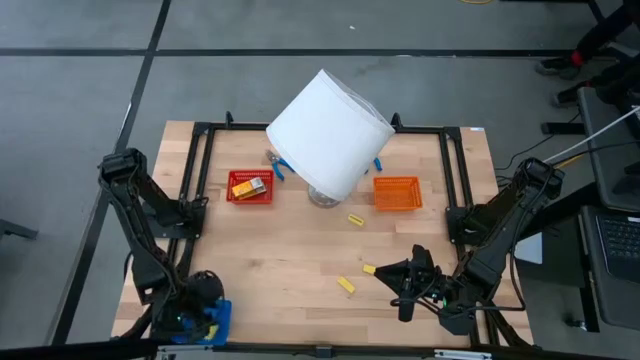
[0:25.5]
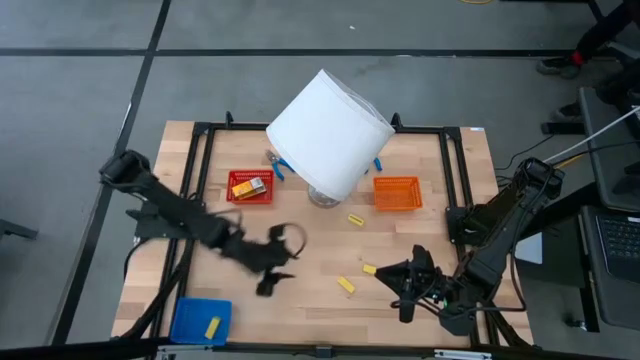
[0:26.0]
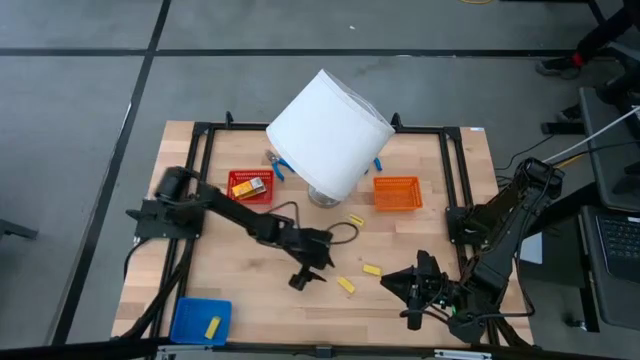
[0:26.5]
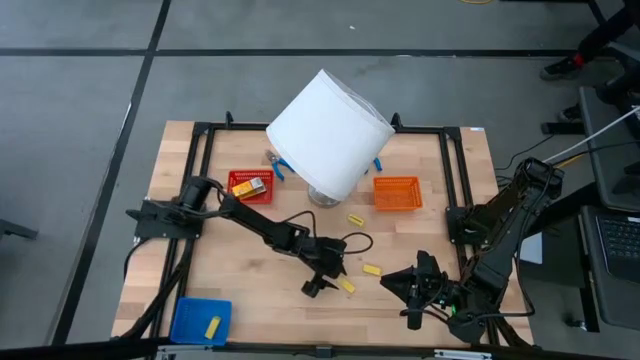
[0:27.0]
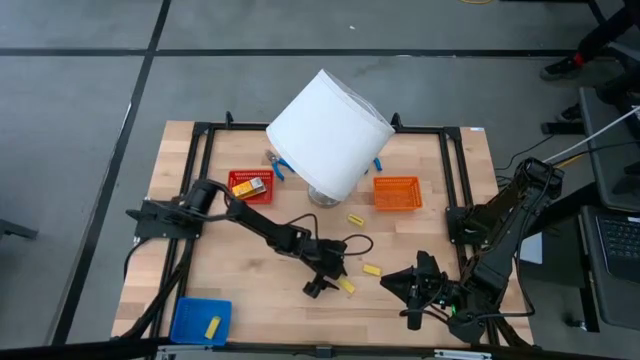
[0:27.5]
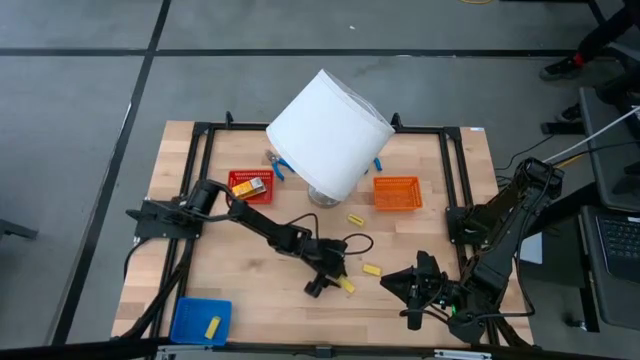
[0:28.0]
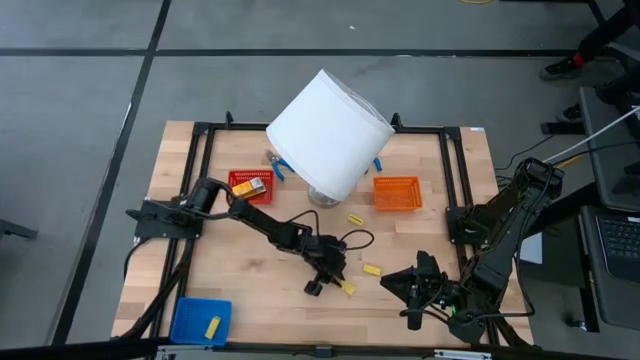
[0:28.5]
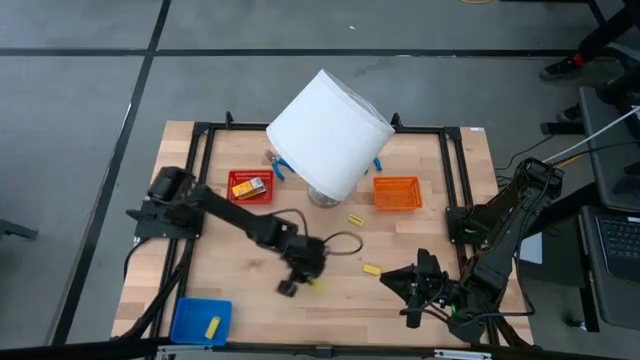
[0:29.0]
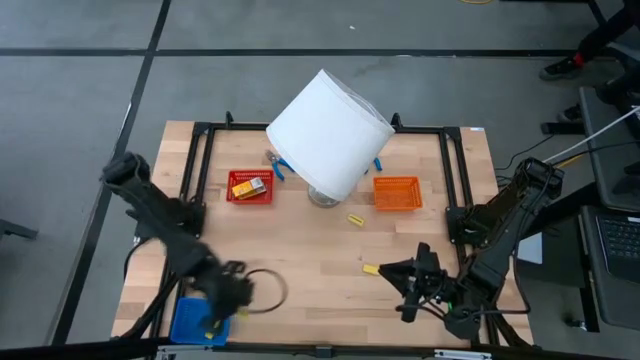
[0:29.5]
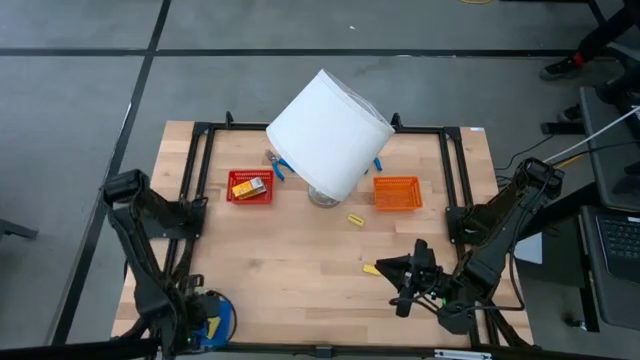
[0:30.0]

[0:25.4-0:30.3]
Task: Pick & Place School Supplies
Put the yellow eraser into the blue bin

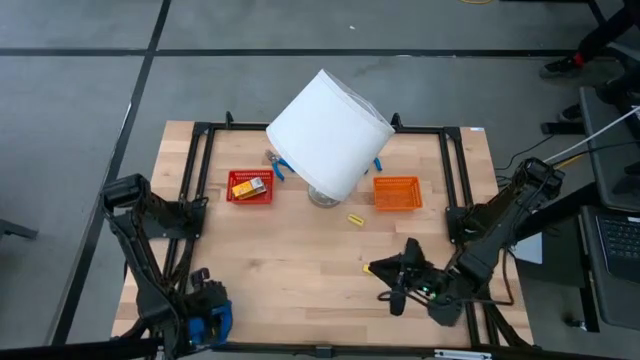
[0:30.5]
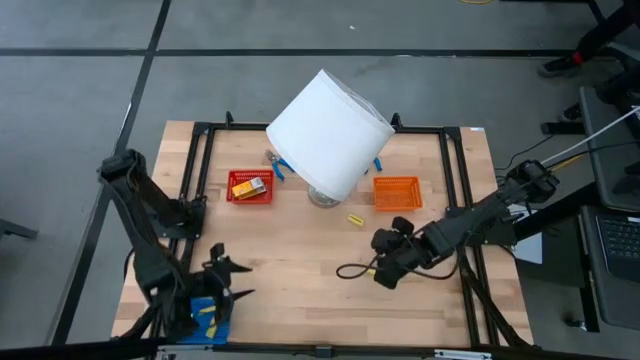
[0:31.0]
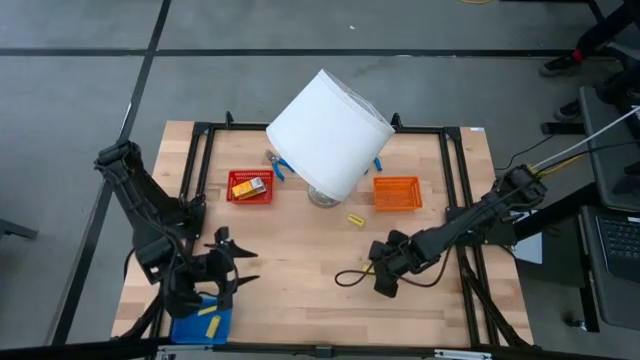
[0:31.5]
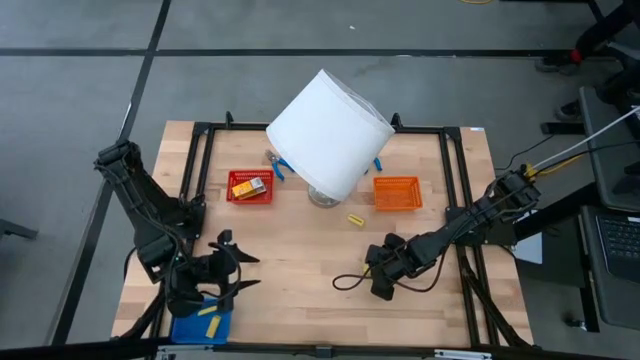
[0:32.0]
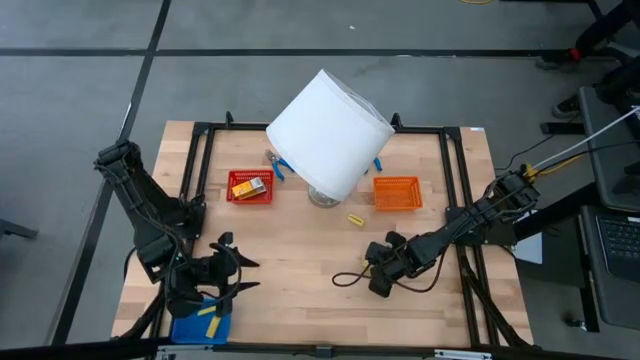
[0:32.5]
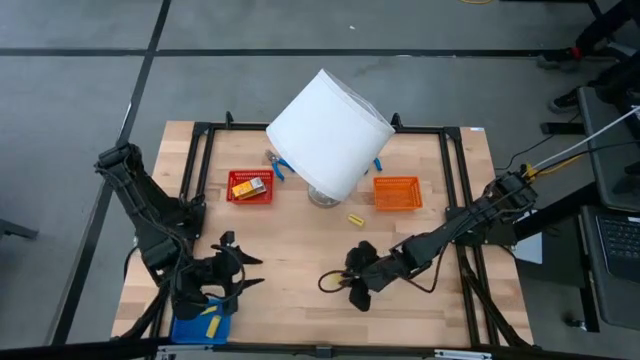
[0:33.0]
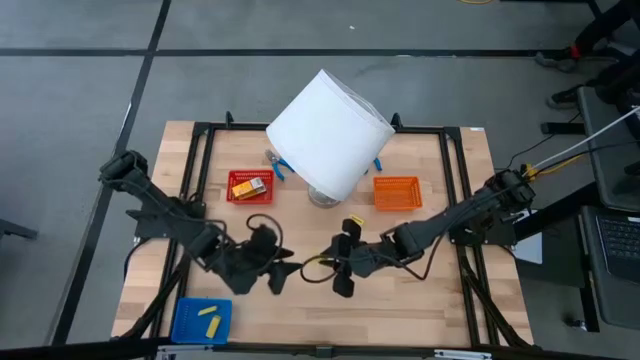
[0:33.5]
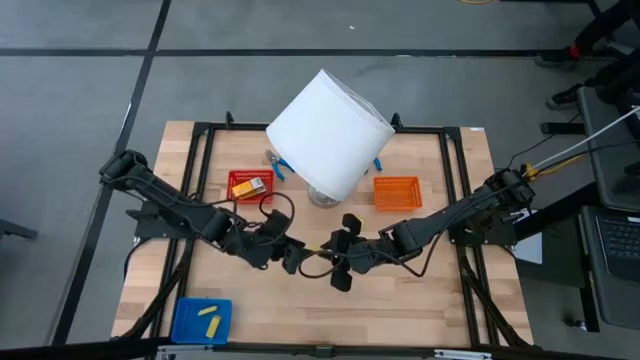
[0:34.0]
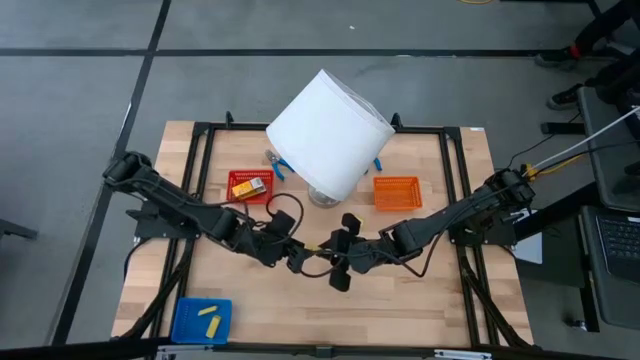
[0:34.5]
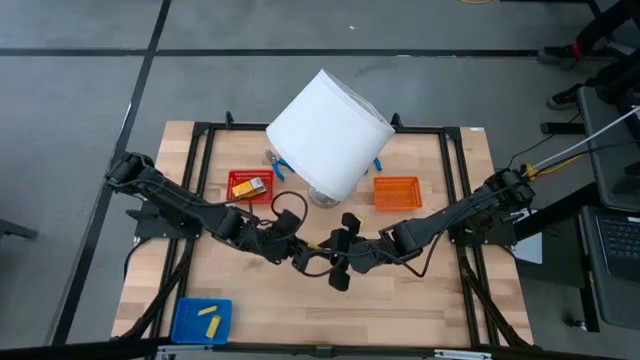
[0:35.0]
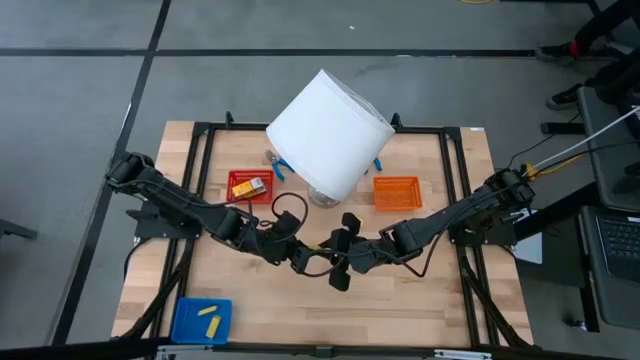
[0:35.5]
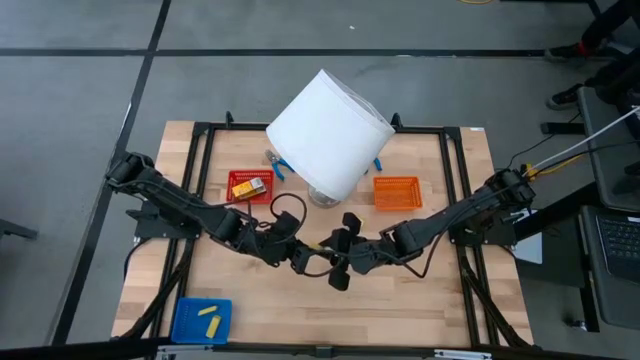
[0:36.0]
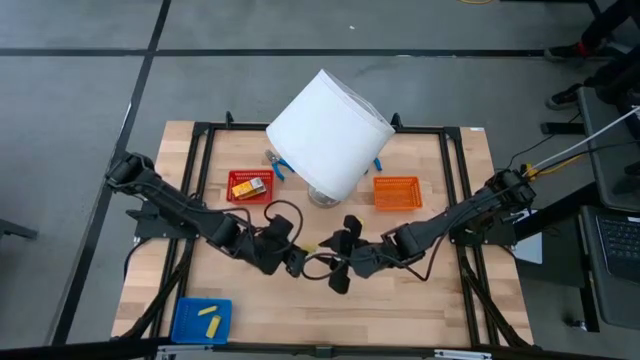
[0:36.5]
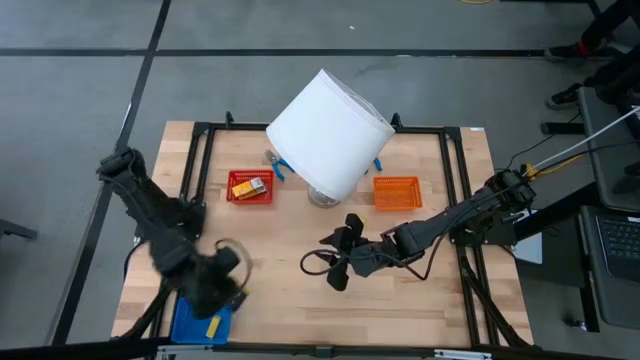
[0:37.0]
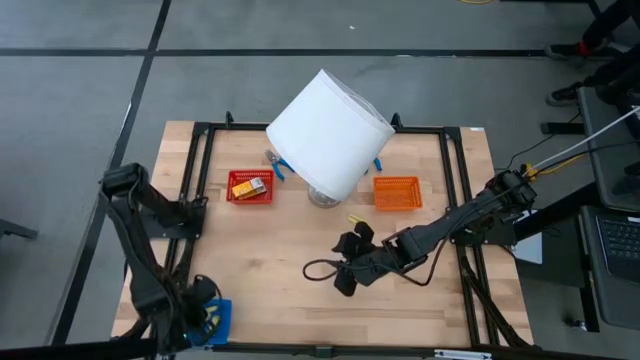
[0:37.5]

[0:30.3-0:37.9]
Put the yellow eraser into the blue bin

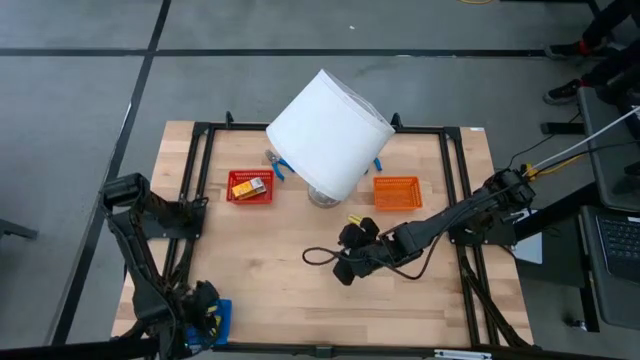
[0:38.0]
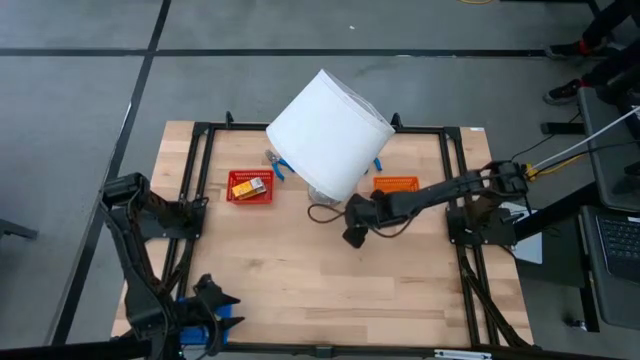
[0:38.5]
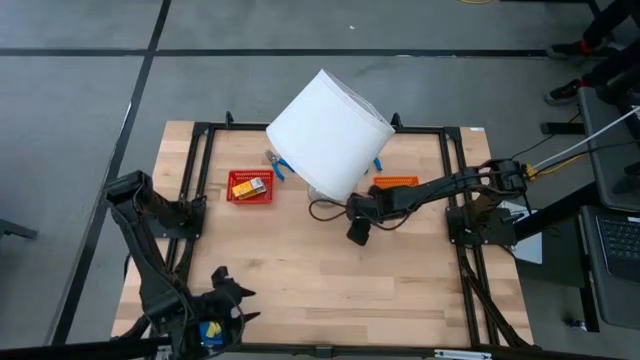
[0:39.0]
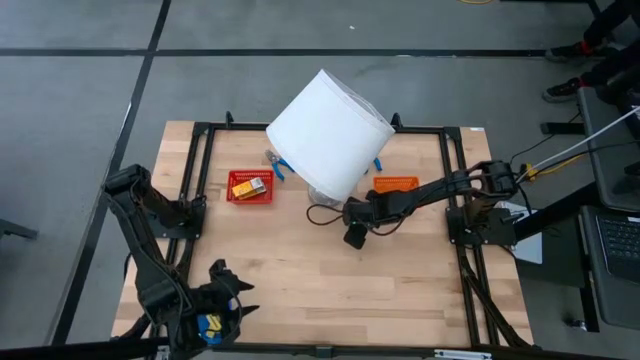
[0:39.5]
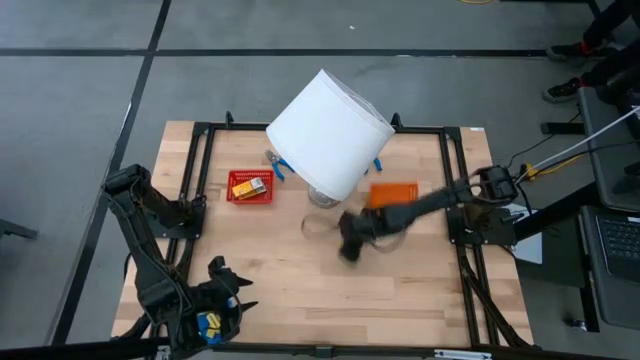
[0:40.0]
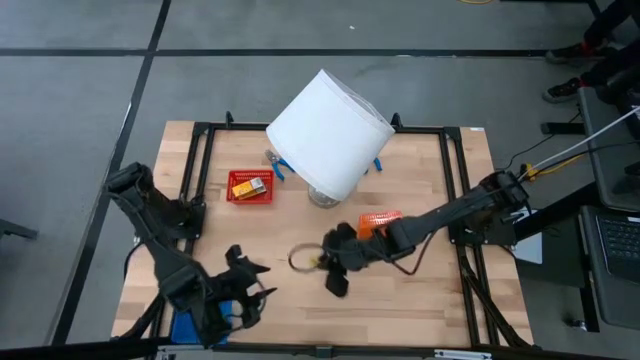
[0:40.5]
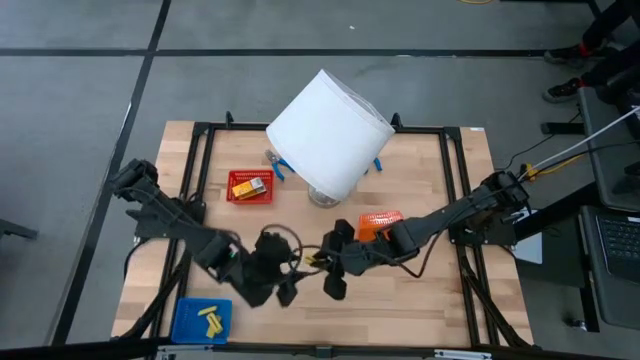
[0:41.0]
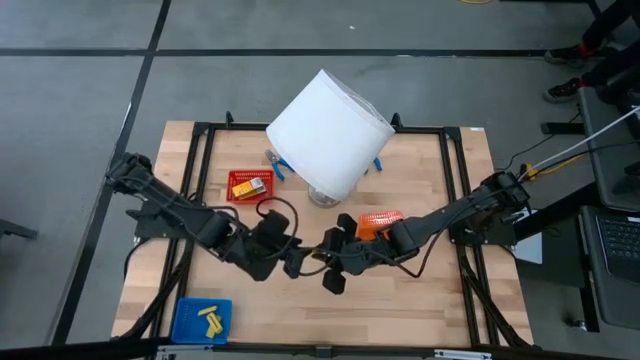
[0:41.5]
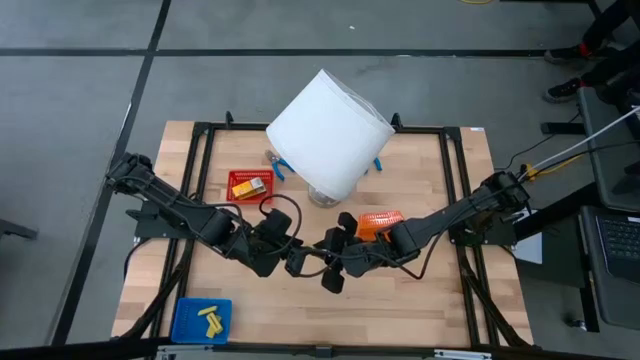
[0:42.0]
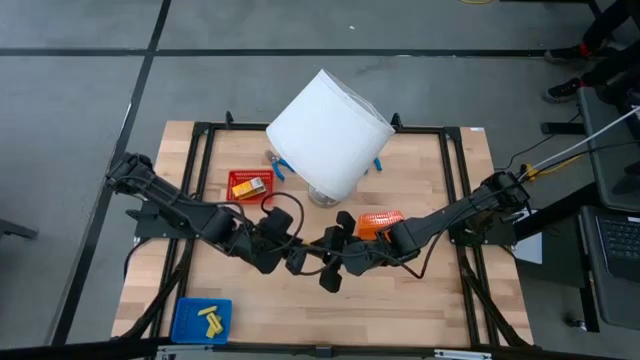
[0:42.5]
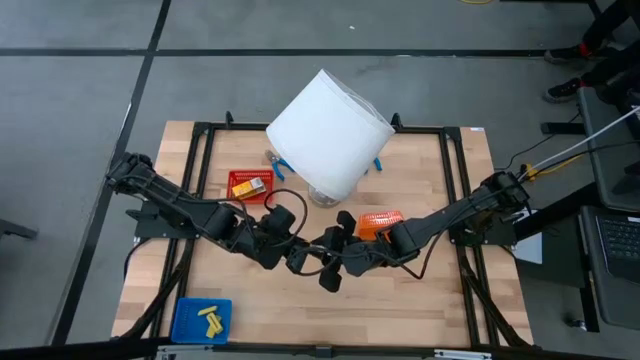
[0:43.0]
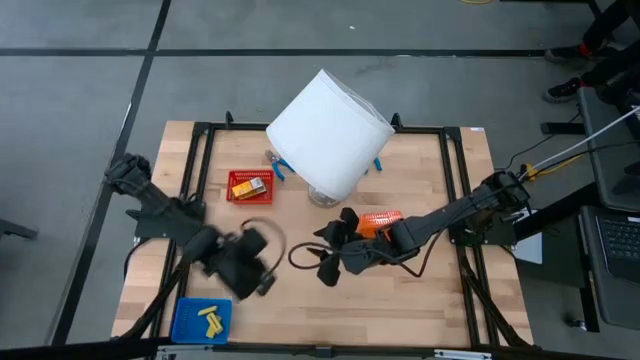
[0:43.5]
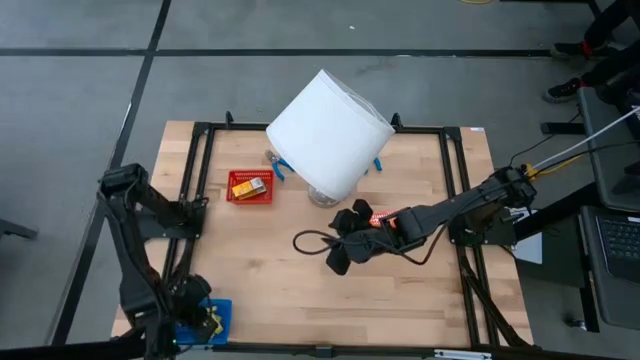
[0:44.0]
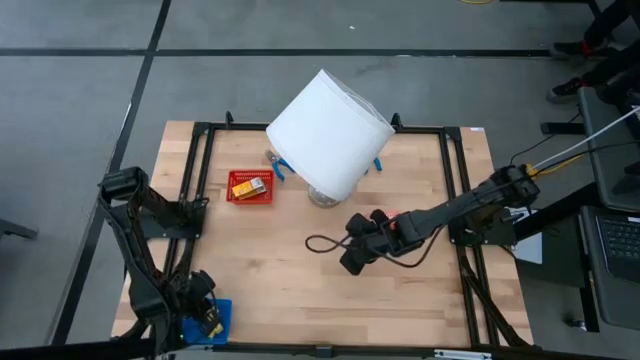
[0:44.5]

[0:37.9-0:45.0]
Put the yellow eraser into the blue bin

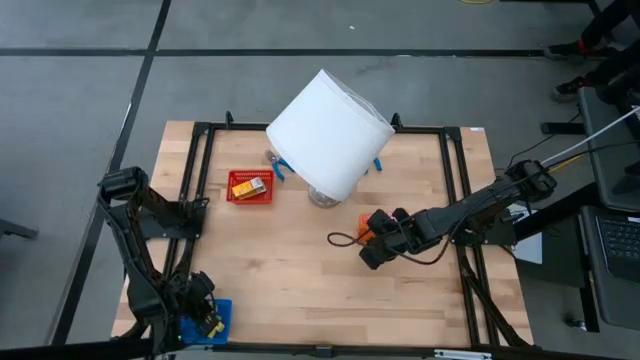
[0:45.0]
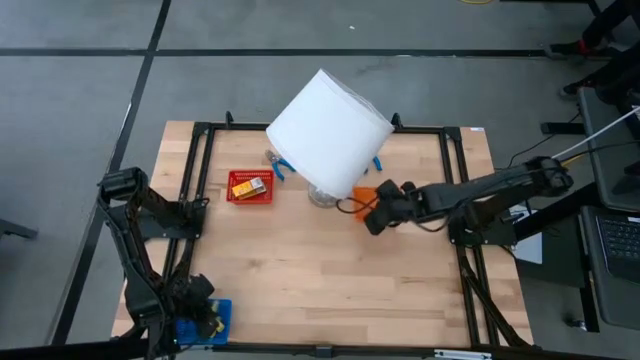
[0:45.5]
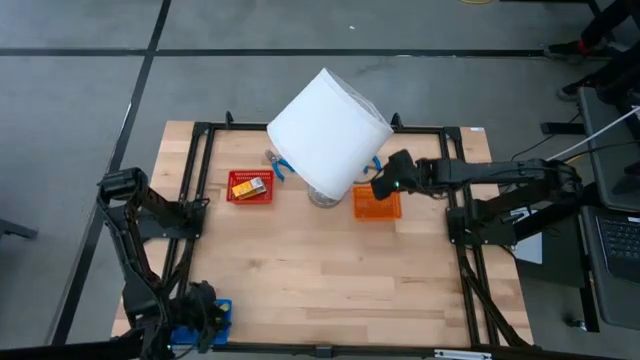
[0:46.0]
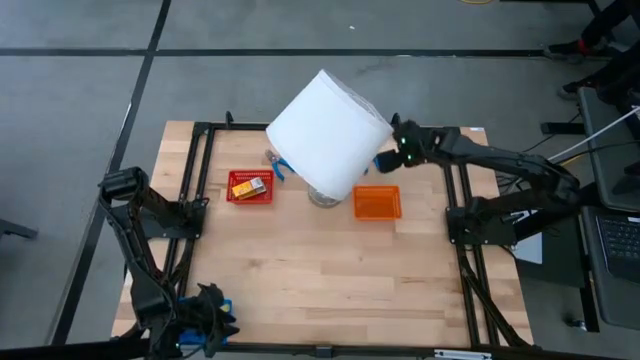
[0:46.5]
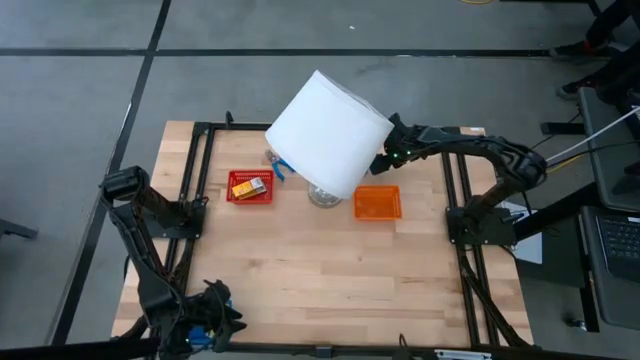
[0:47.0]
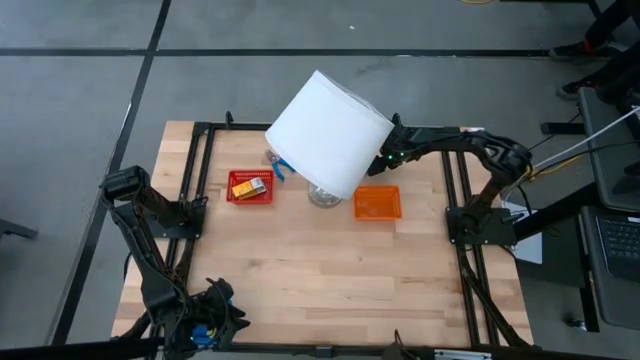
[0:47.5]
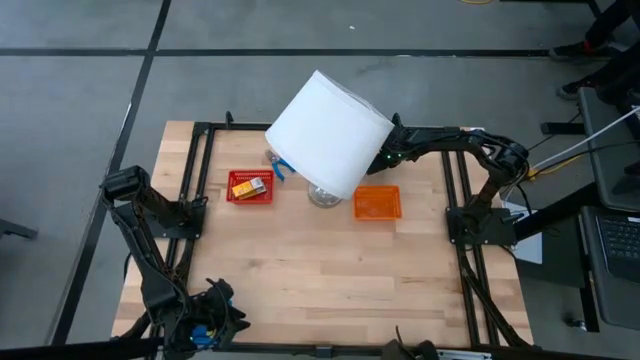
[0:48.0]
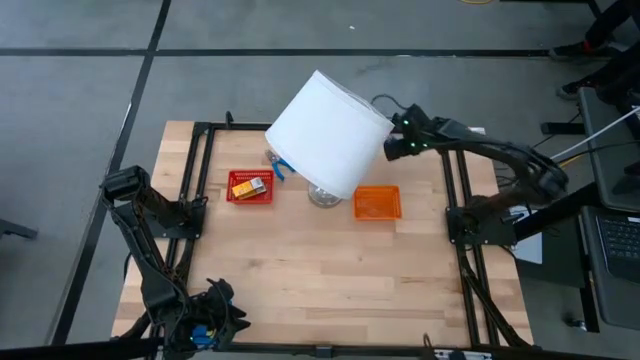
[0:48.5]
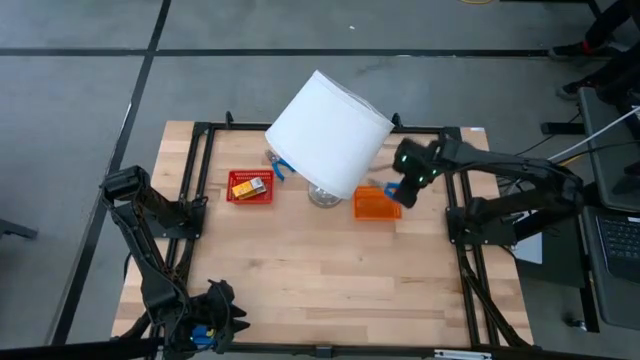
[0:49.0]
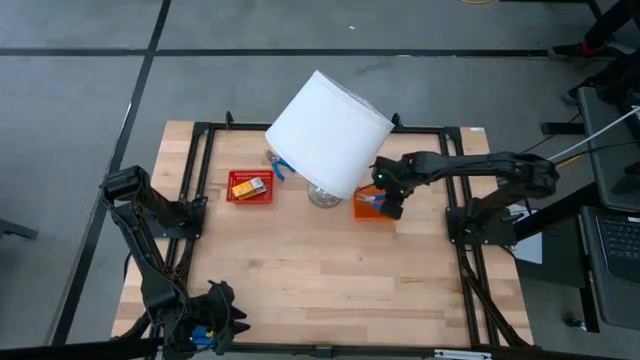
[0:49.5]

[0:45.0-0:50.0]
Put the blue hole puncher into the orange bin
